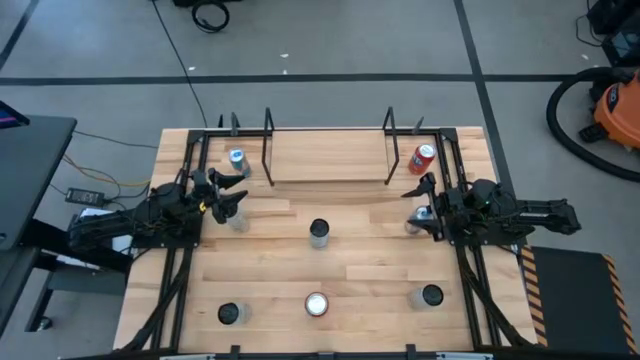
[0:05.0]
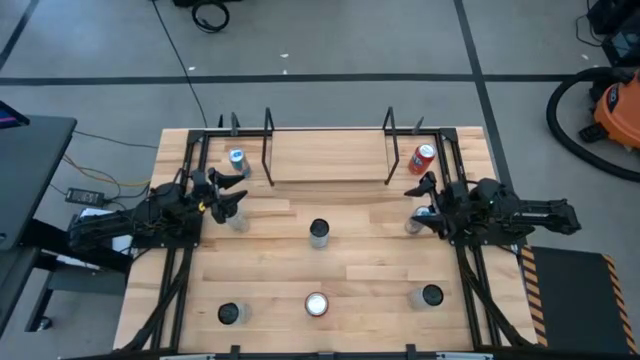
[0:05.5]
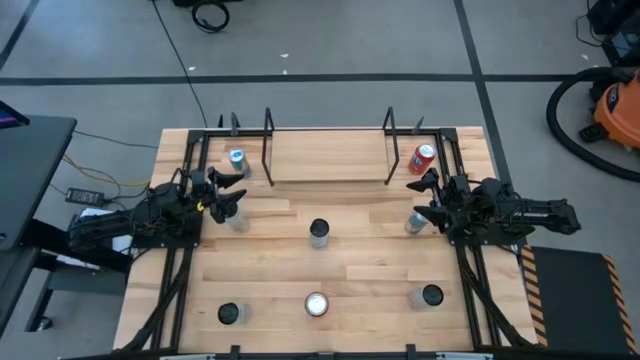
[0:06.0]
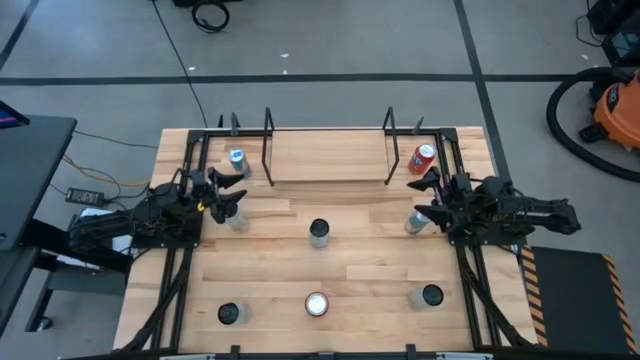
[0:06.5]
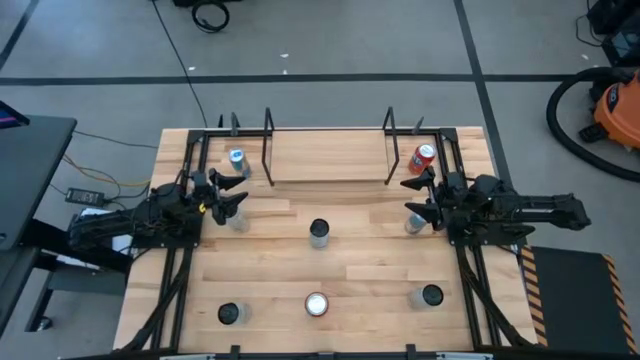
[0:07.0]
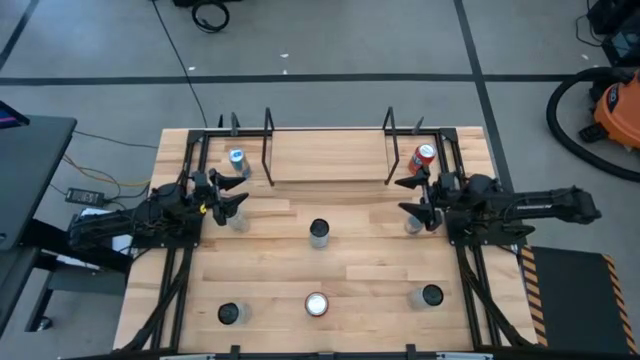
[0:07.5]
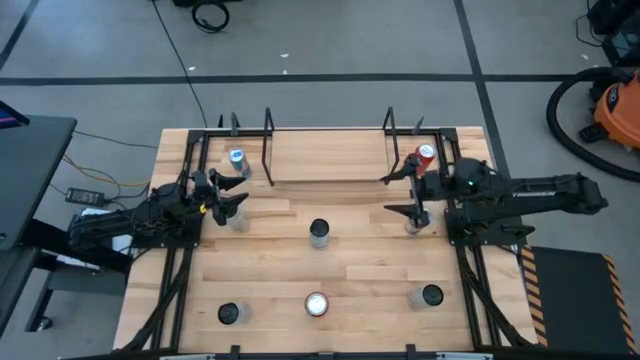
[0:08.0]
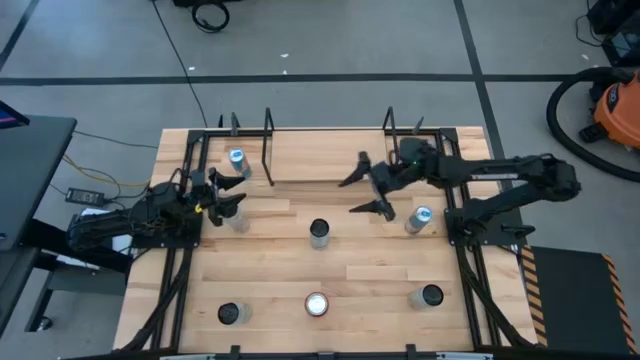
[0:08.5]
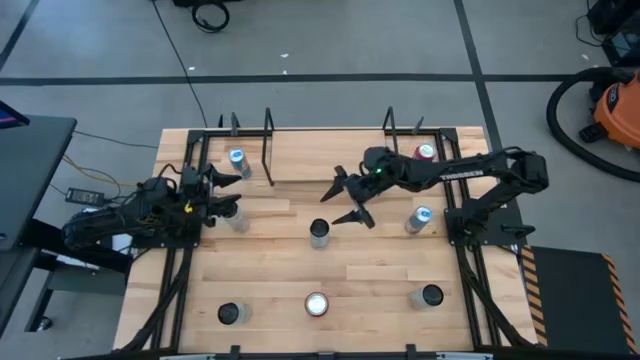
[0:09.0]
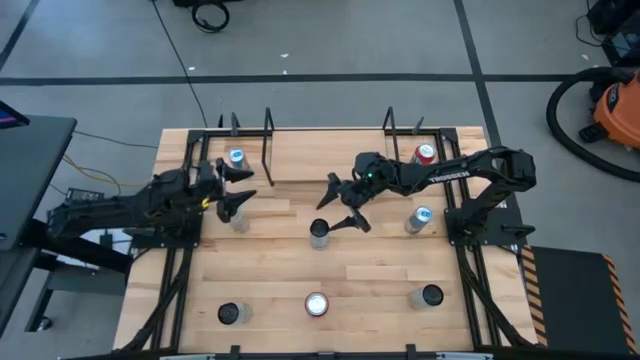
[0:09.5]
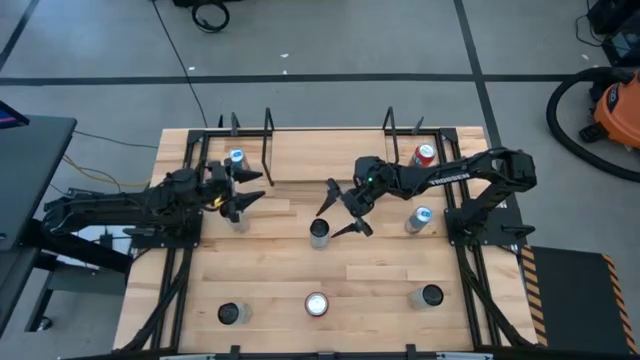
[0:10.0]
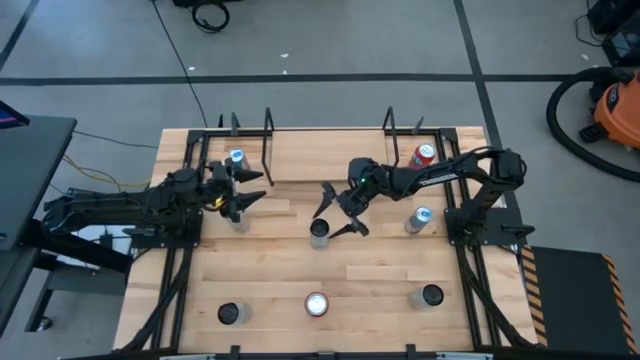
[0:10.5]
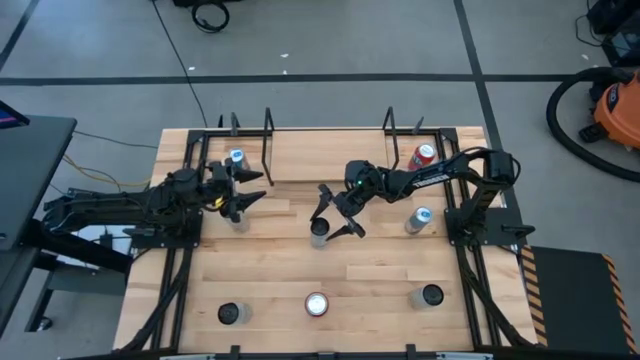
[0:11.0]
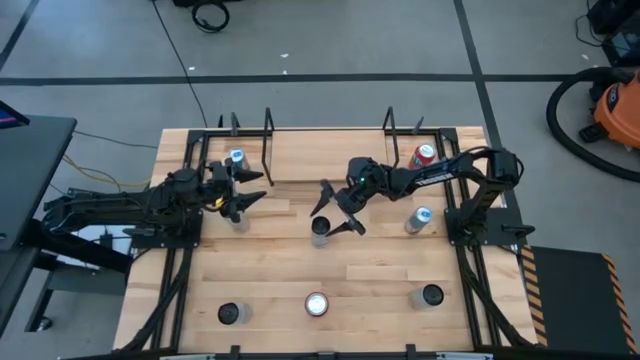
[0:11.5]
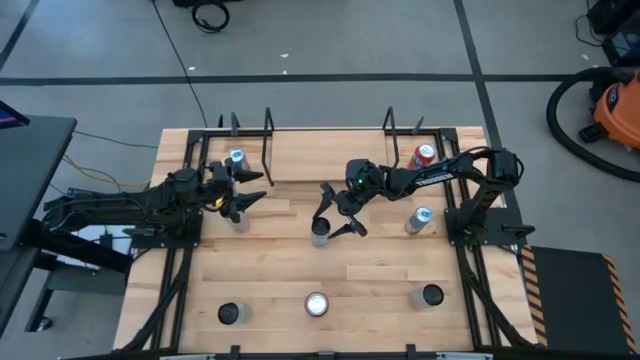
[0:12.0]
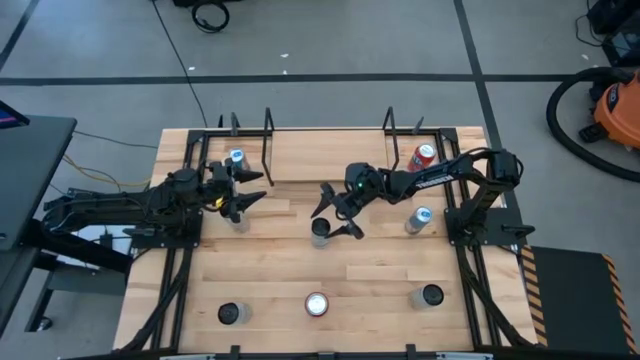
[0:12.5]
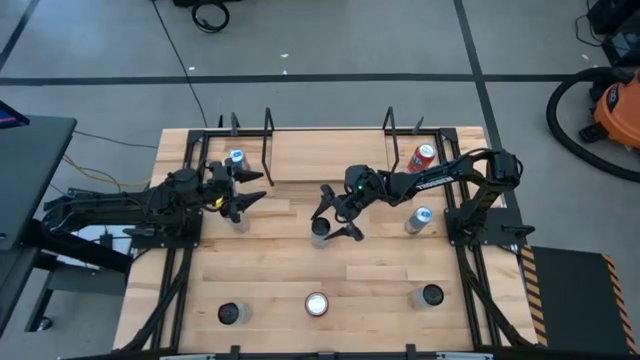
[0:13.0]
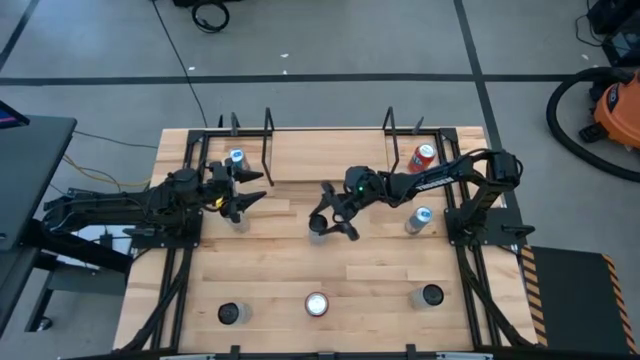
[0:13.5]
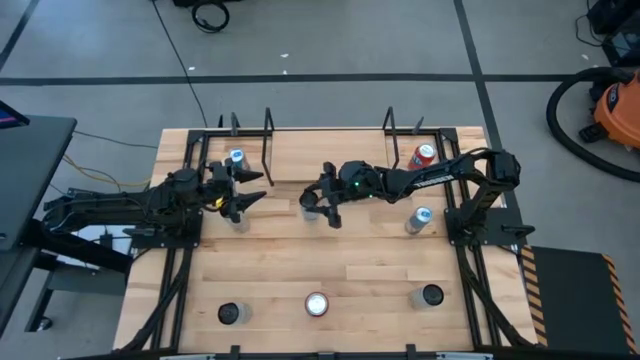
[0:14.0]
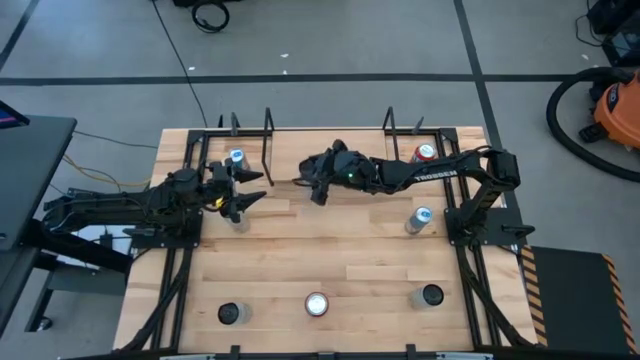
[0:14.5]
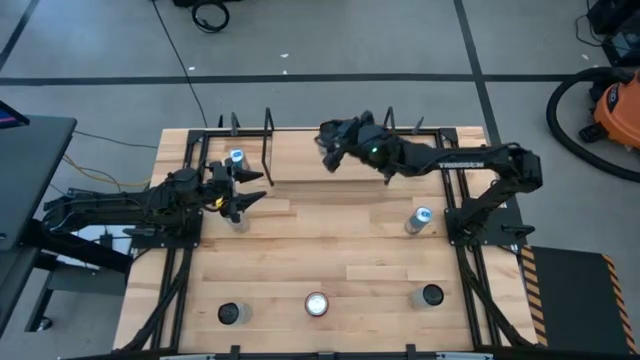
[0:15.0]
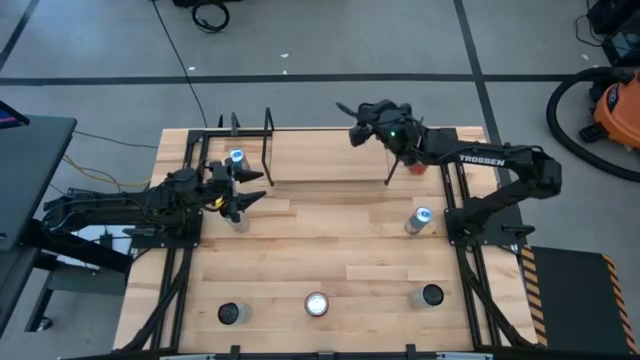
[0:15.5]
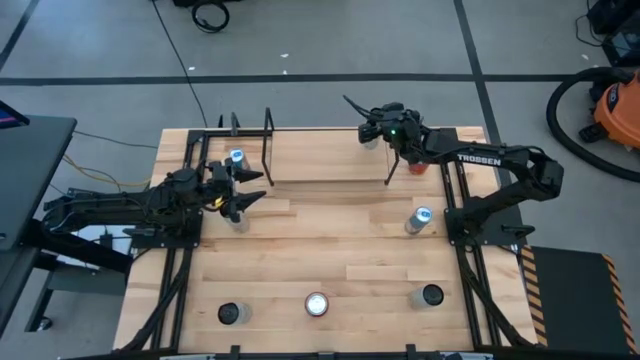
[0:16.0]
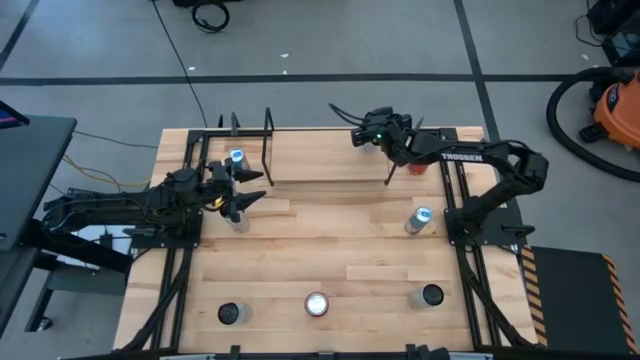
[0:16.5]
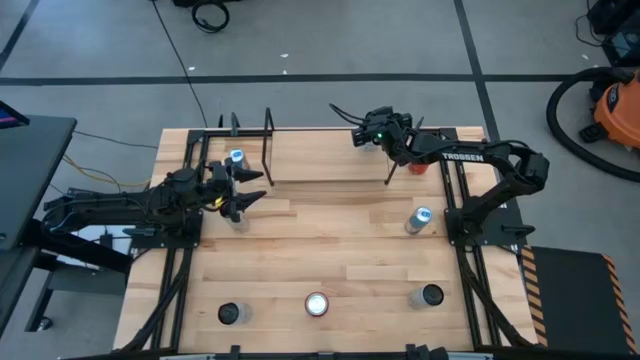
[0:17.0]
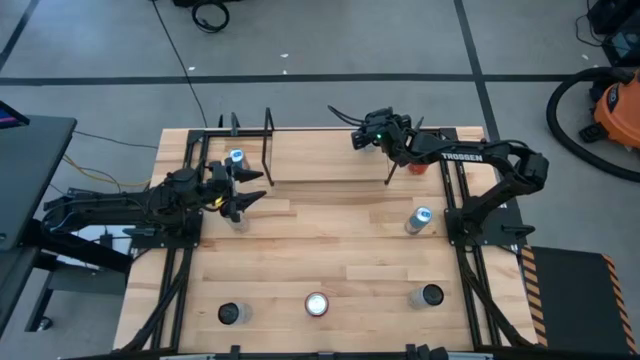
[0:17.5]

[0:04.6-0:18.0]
Task: Place canned beverage on shelf
Put the top white blue soda can on the shelf

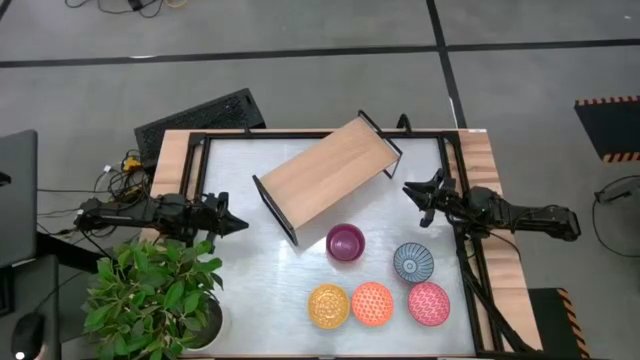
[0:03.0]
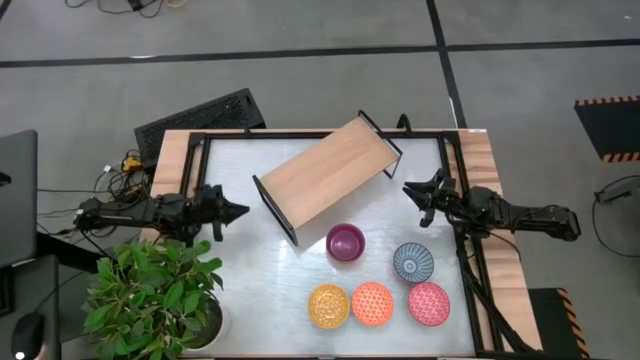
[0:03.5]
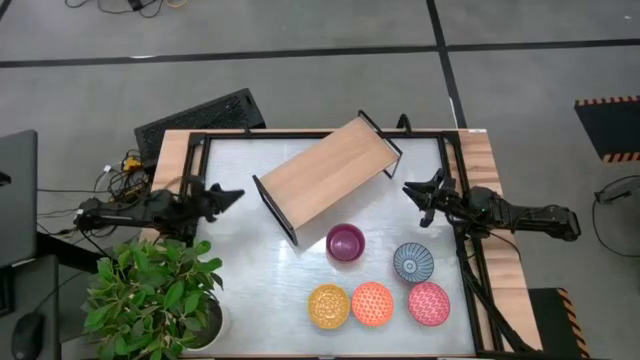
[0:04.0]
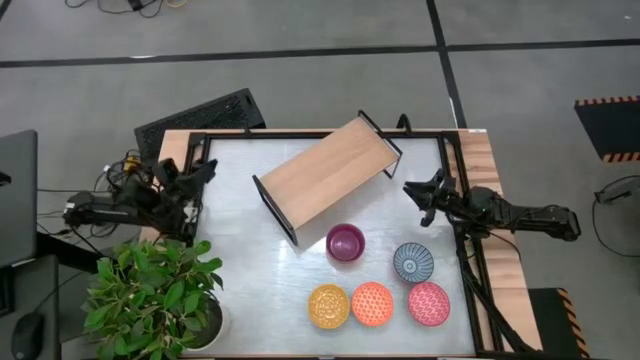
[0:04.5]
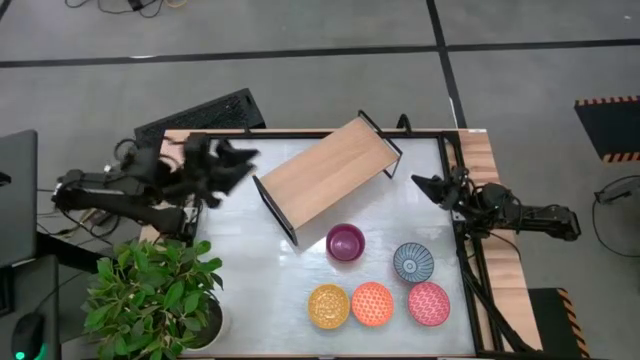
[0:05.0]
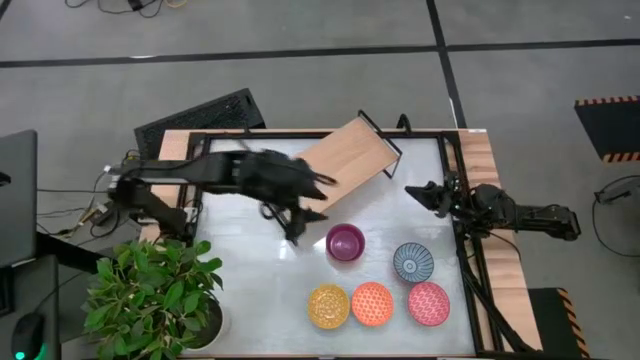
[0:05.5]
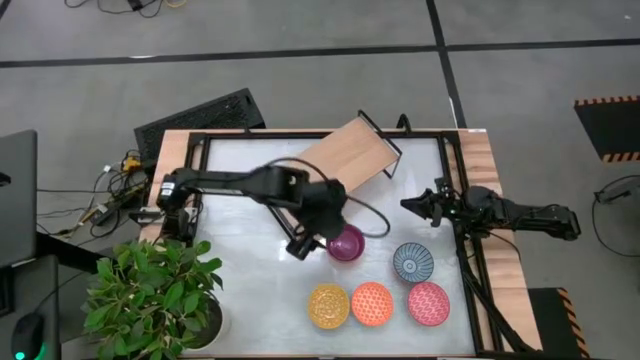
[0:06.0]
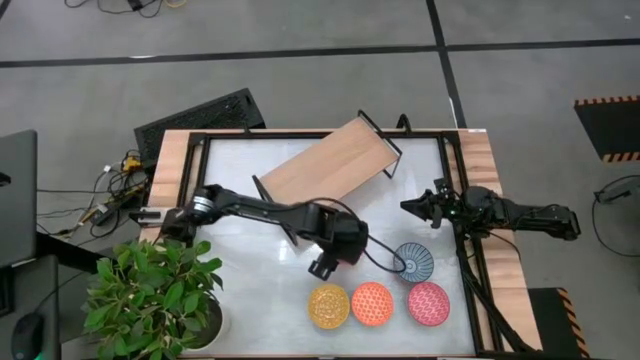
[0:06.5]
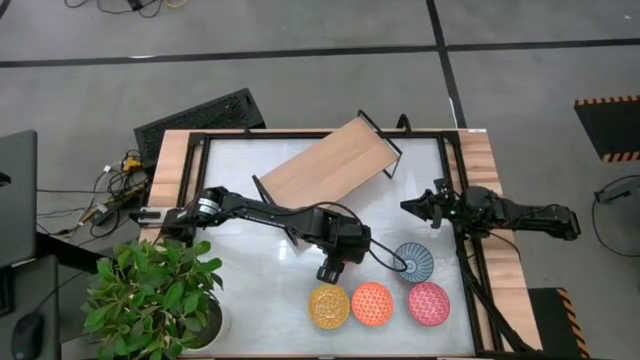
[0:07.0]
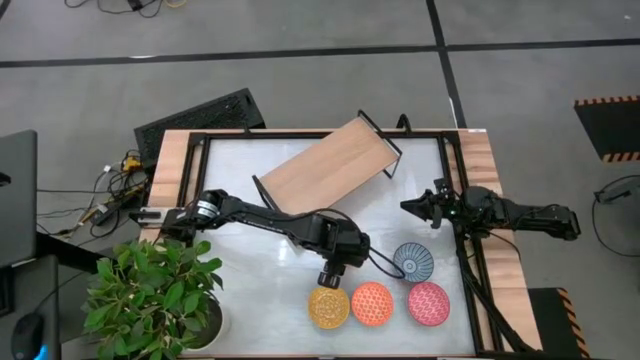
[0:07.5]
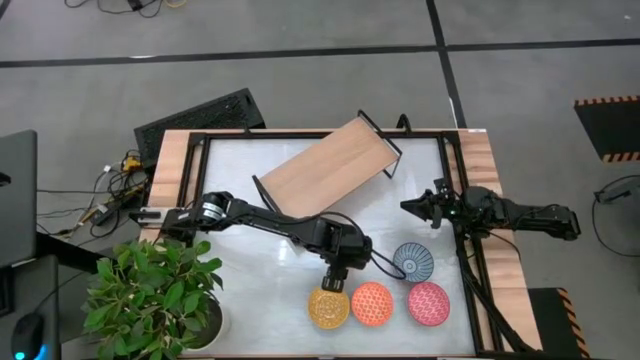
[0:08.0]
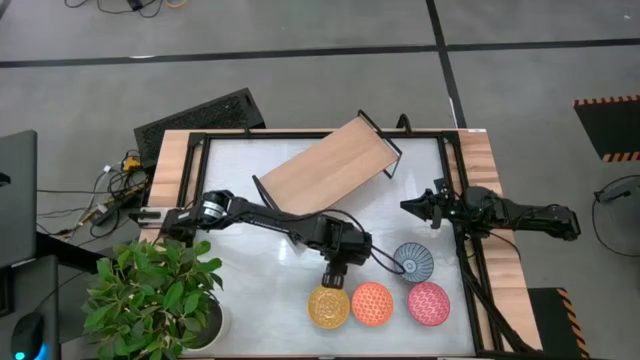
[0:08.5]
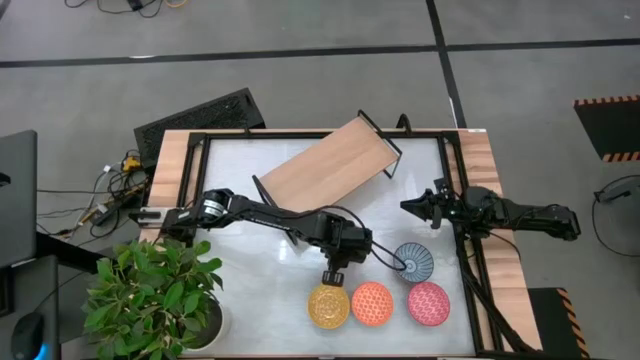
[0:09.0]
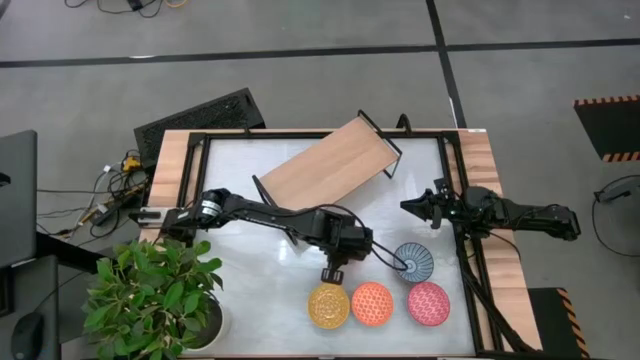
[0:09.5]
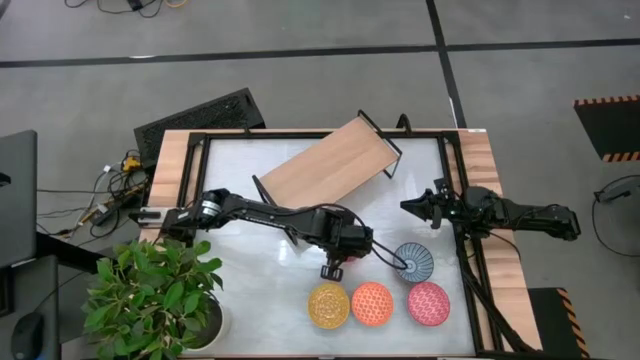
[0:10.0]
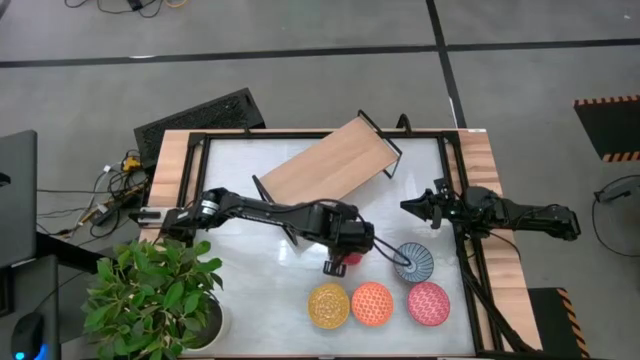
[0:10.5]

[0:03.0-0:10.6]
Task: Place and stack bowls onto a shelf
Put the purple bowl on the shelf
